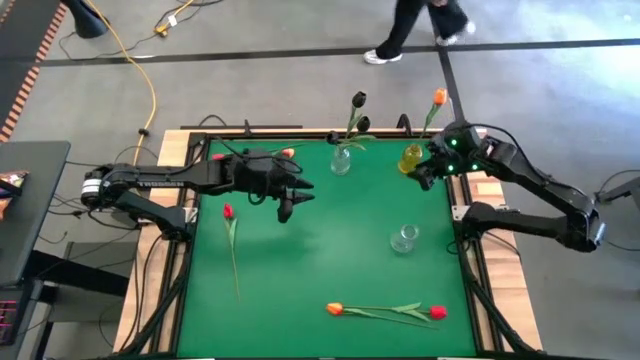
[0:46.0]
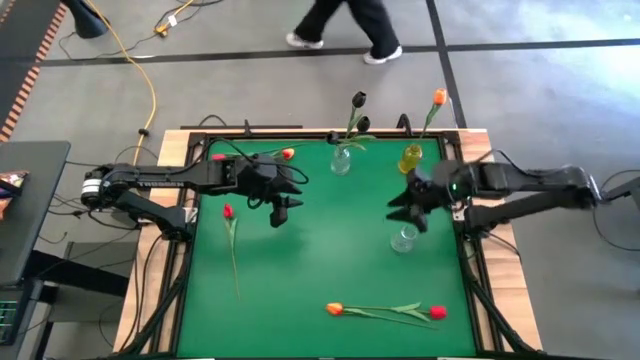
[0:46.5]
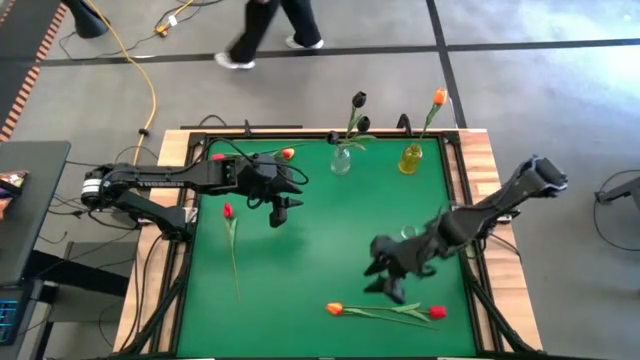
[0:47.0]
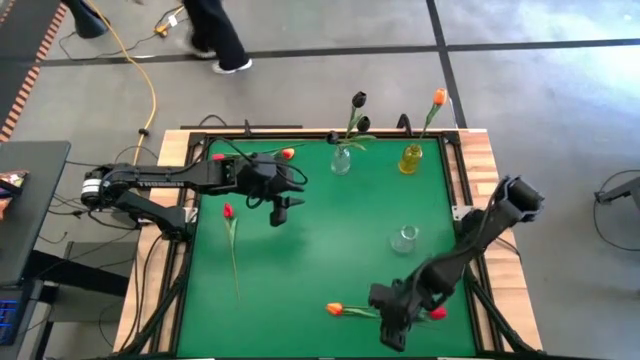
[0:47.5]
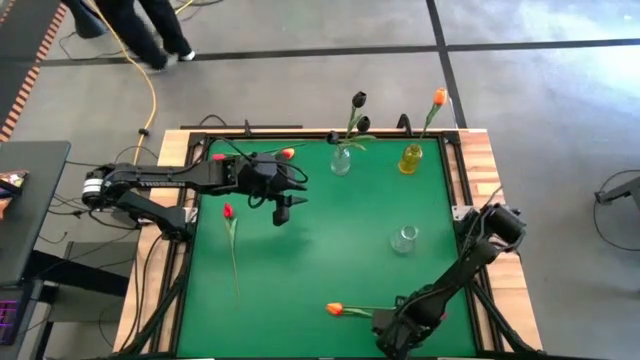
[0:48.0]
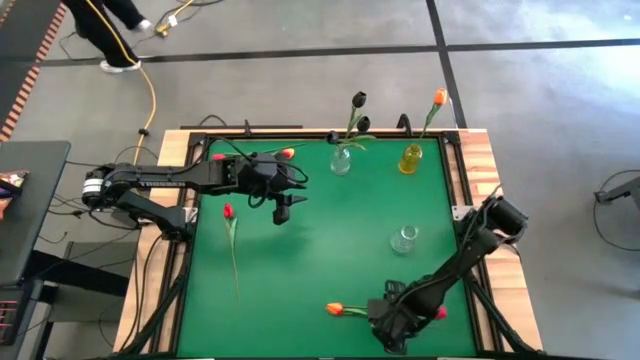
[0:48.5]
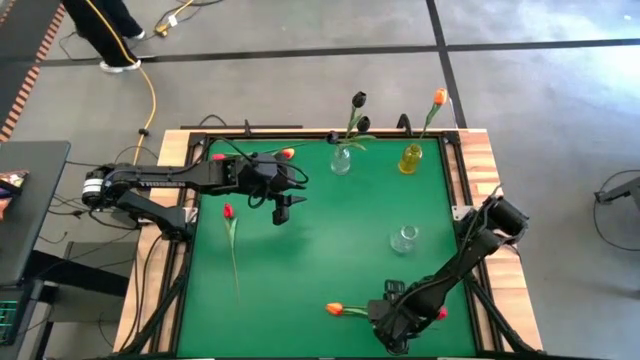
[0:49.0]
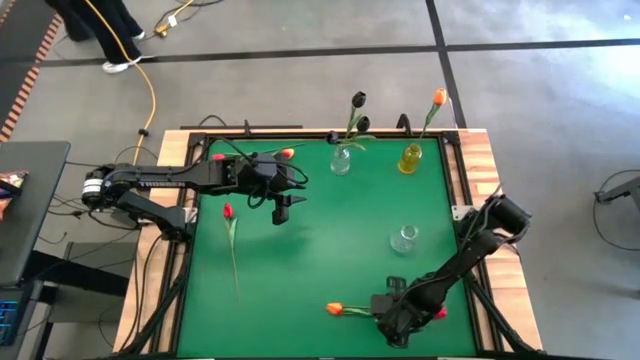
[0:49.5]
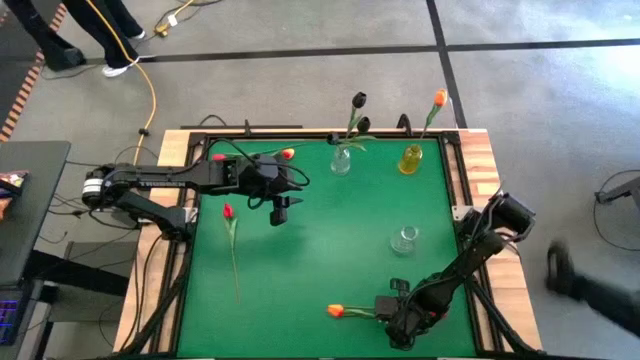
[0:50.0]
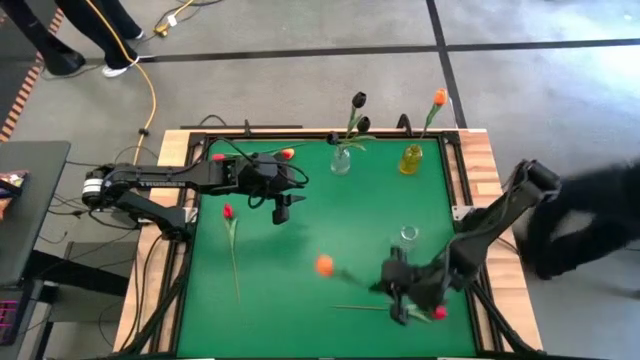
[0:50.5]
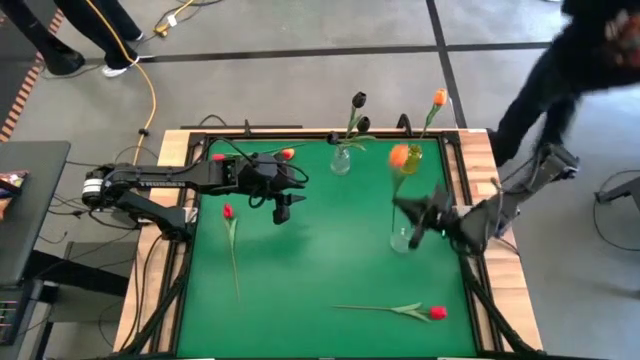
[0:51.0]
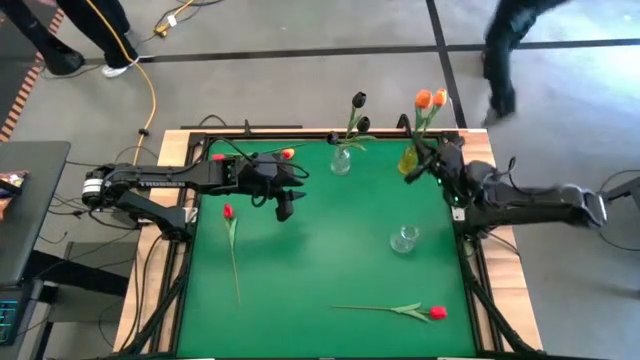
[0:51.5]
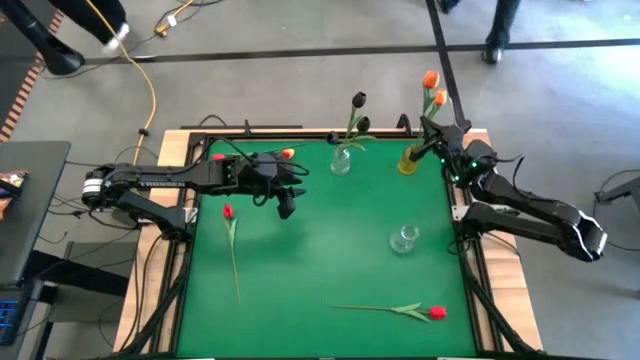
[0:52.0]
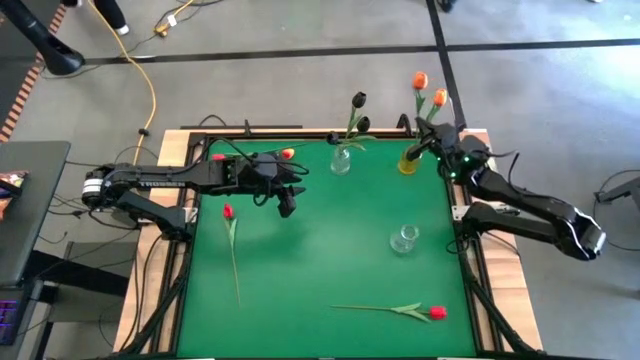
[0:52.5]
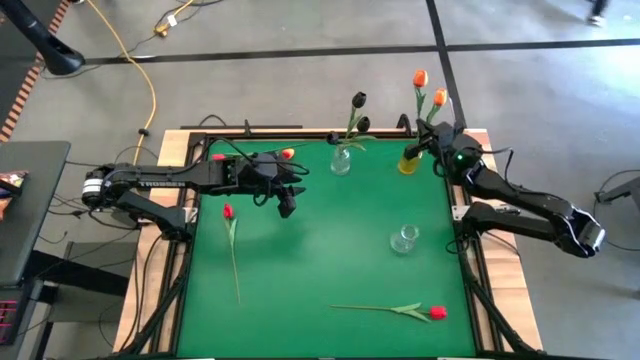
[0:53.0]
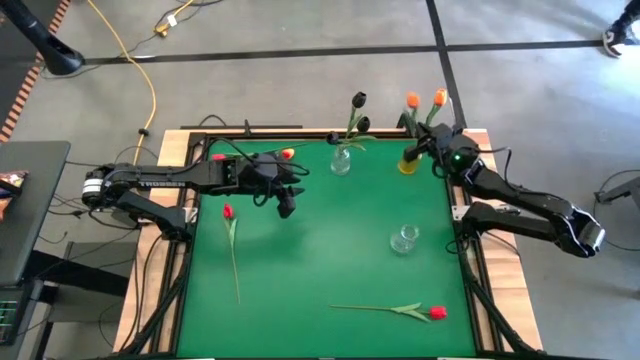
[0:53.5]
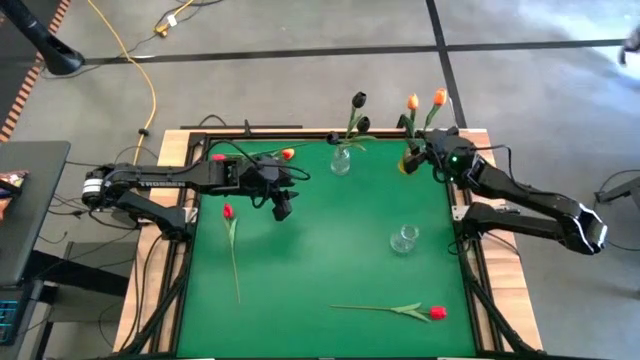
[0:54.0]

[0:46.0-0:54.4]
Task: Sort flowers into vase by color
Put the bottom orange flower into the yellow vase

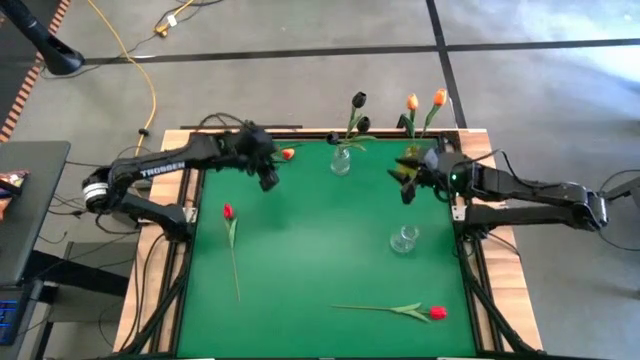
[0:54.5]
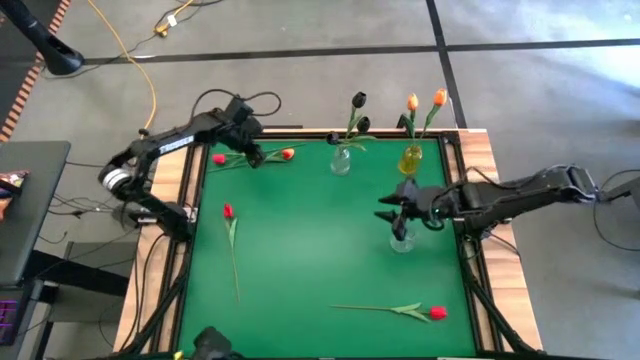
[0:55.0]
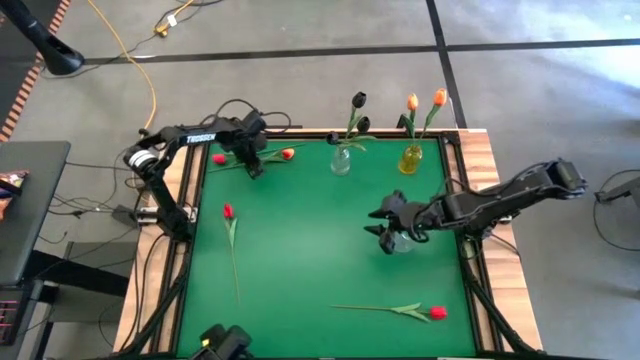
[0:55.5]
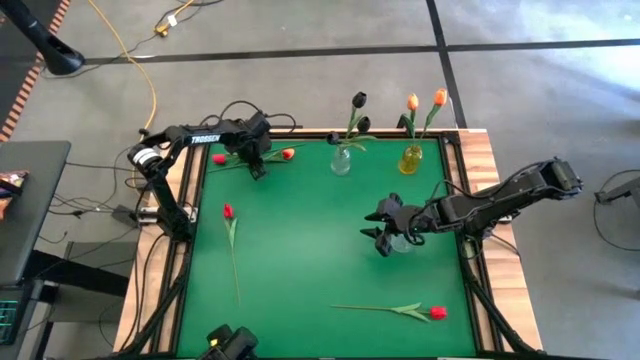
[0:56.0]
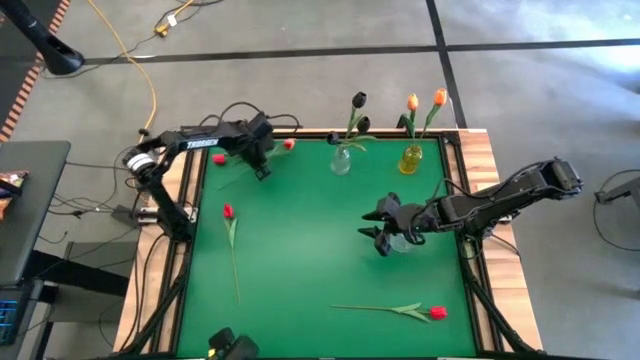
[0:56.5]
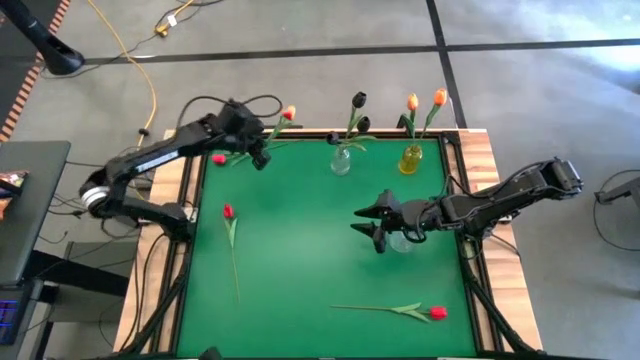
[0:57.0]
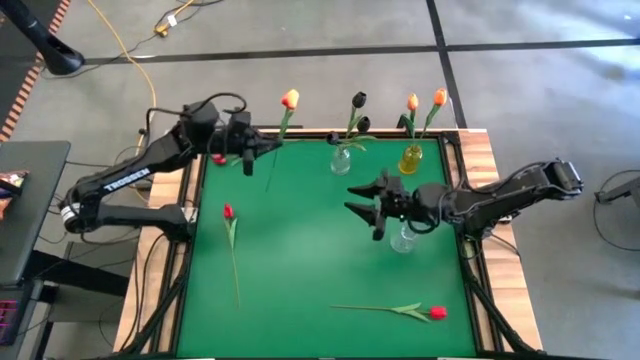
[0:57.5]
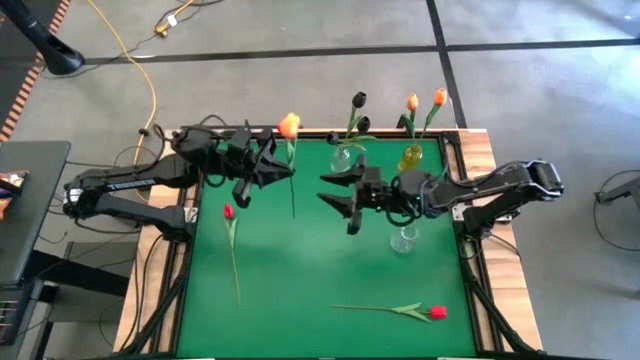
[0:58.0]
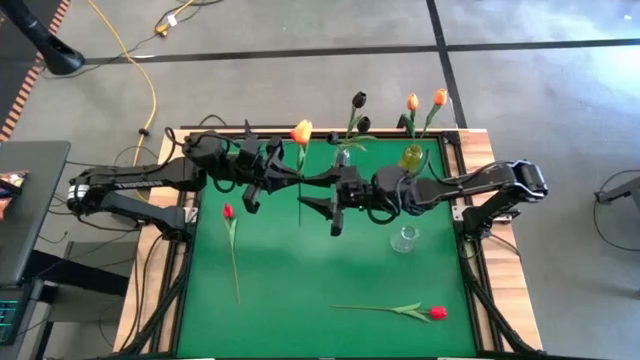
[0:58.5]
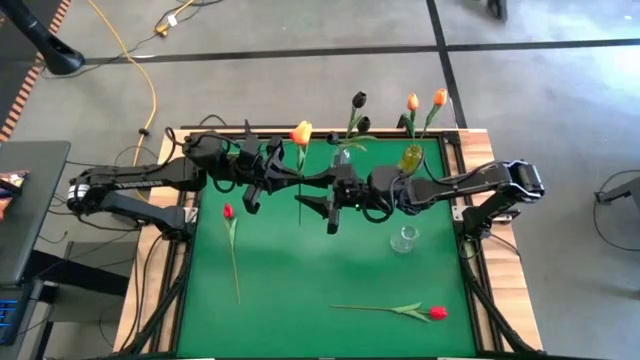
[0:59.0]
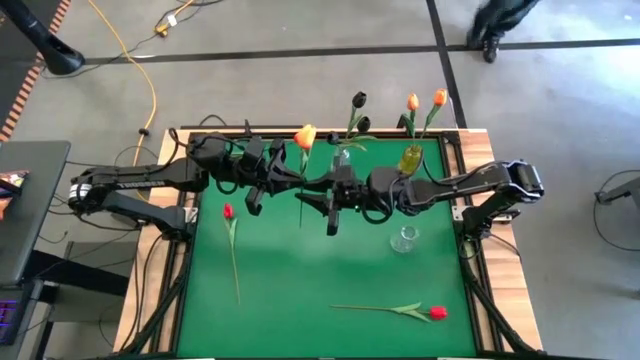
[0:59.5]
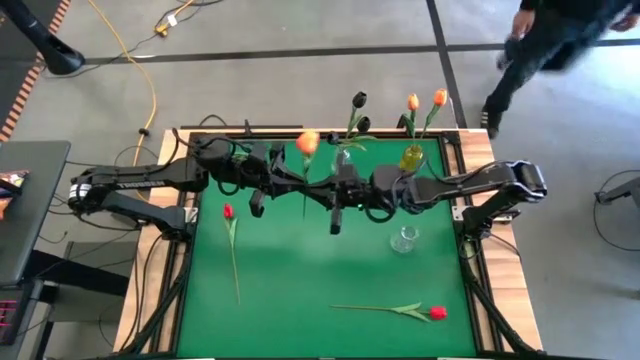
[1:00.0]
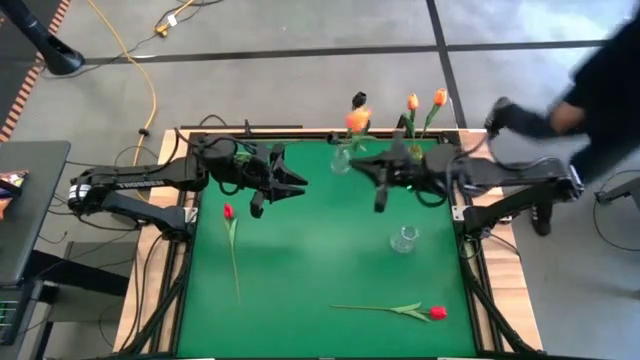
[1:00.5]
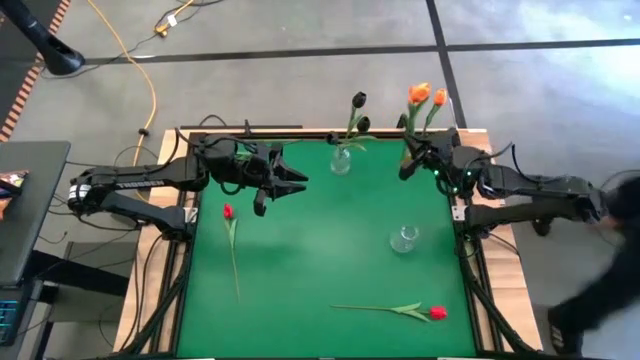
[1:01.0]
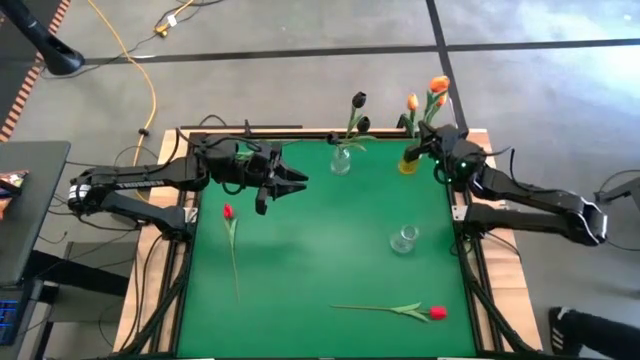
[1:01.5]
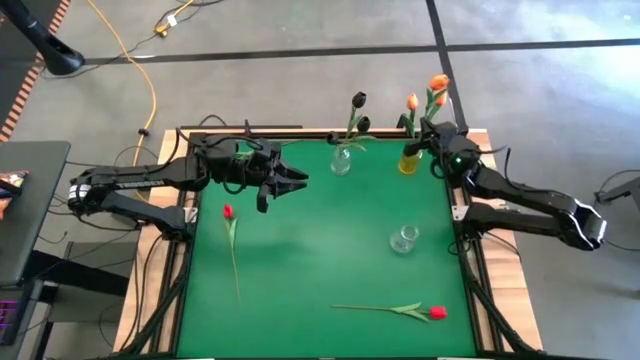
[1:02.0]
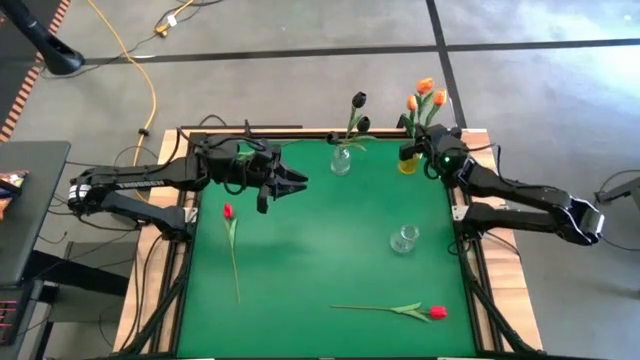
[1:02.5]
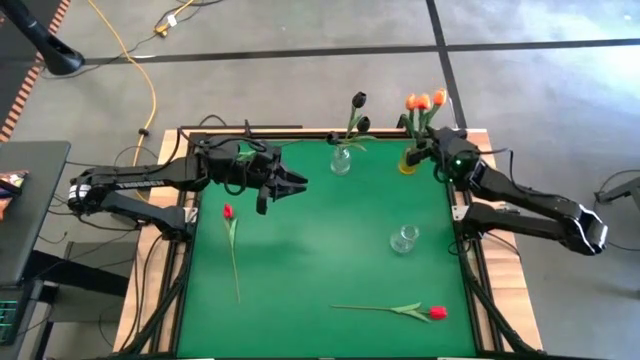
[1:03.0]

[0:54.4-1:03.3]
Put the orange flower into the yellow vase

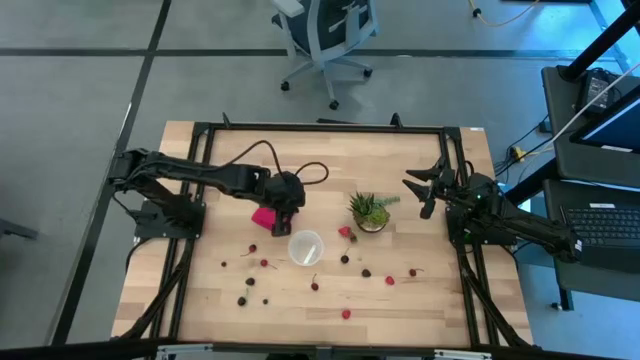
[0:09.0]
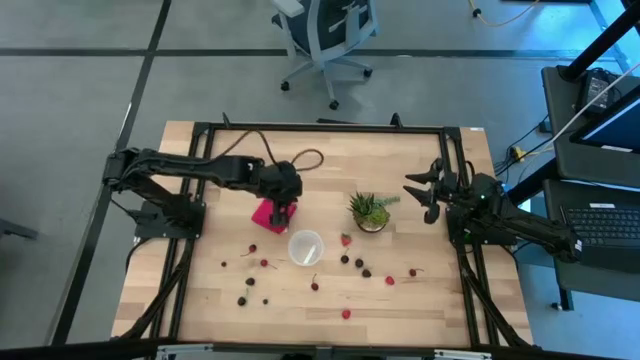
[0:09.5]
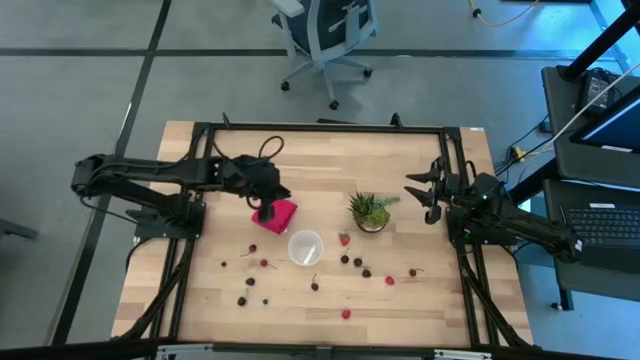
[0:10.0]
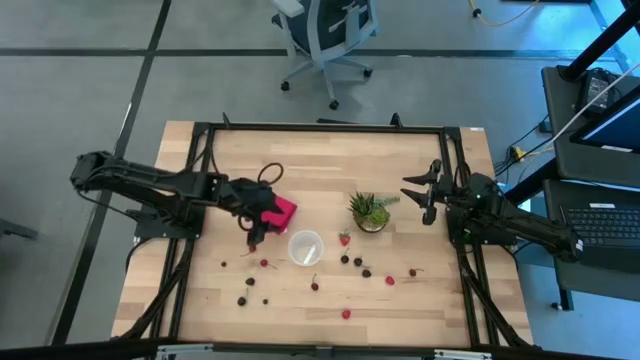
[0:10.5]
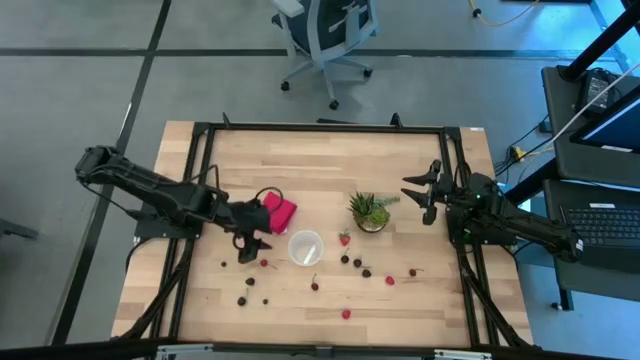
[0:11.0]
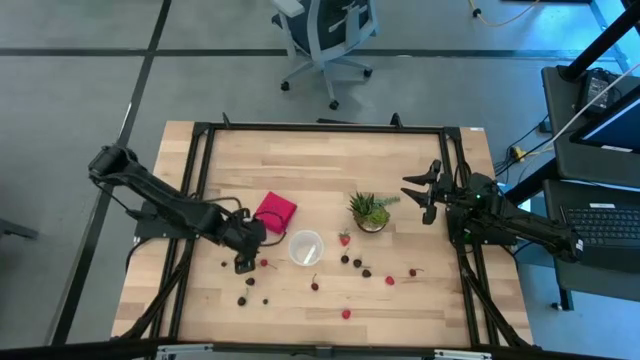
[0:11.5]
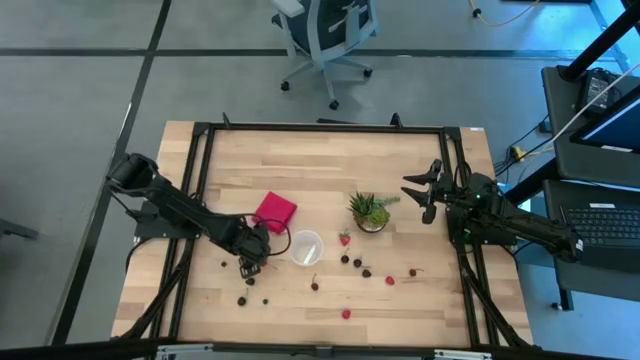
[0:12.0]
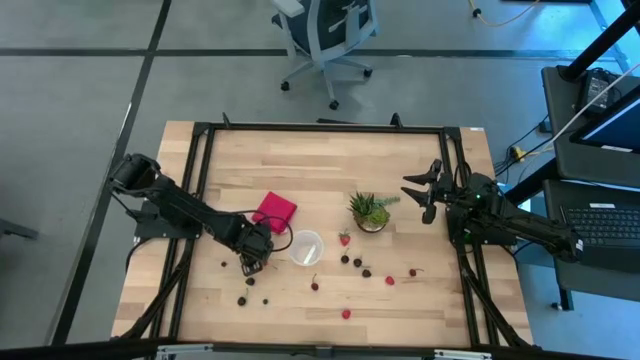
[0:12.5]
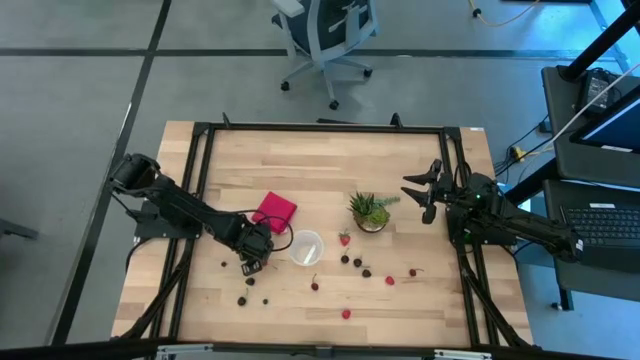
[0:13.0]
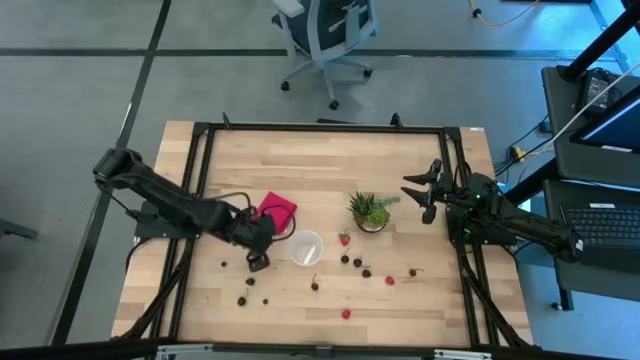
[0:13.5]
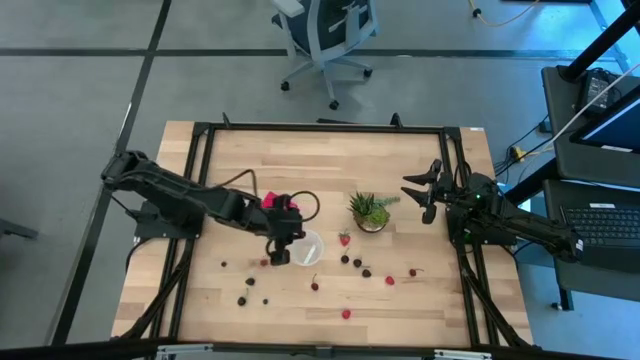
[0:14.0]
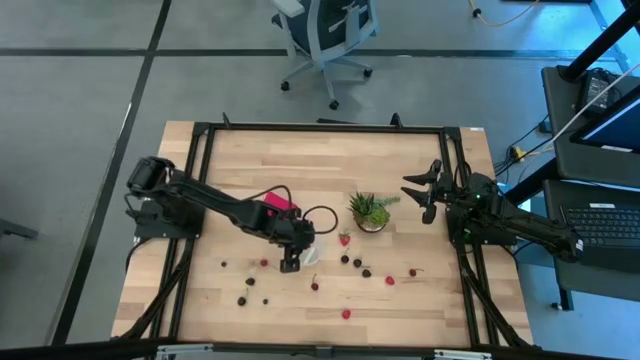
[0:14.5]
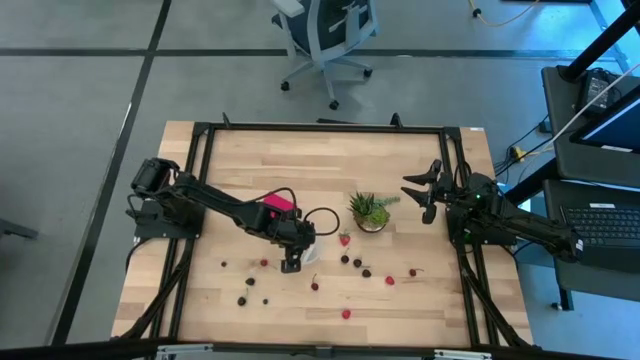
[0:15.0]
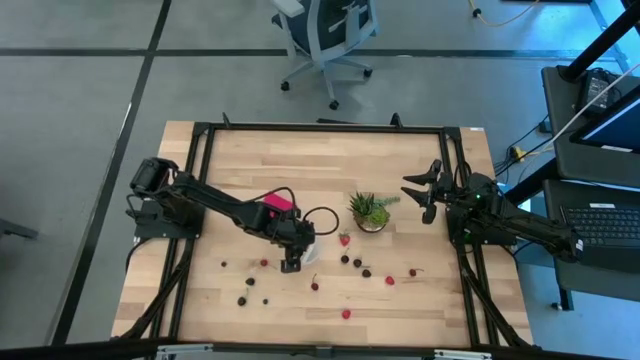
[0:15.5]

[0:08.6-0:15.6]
Task: Pick and placing Produce into tupperware
Put the red cherry into the container
